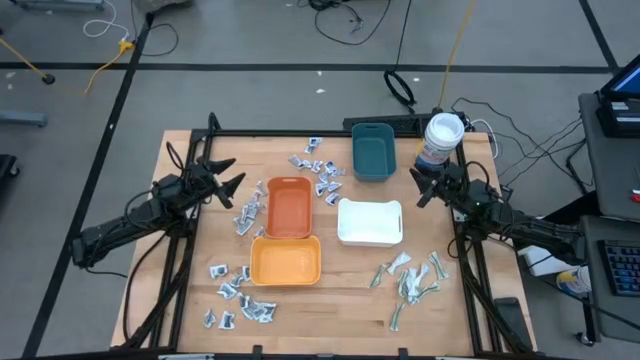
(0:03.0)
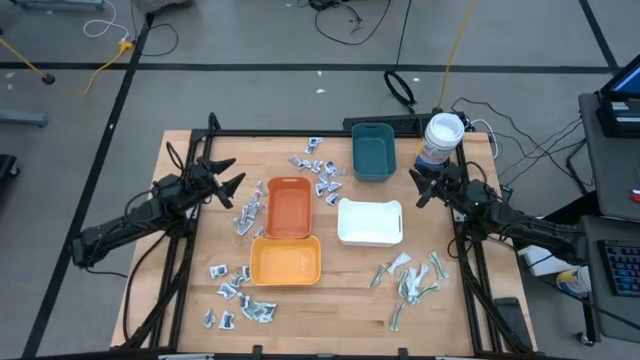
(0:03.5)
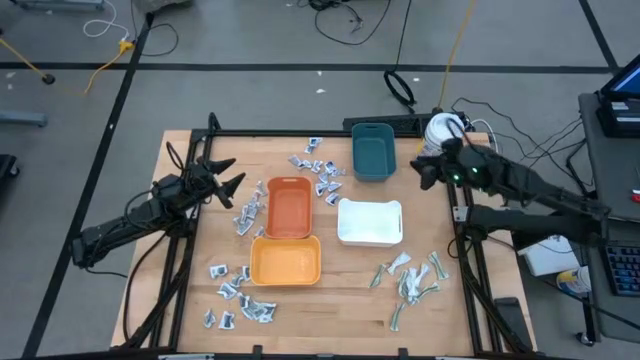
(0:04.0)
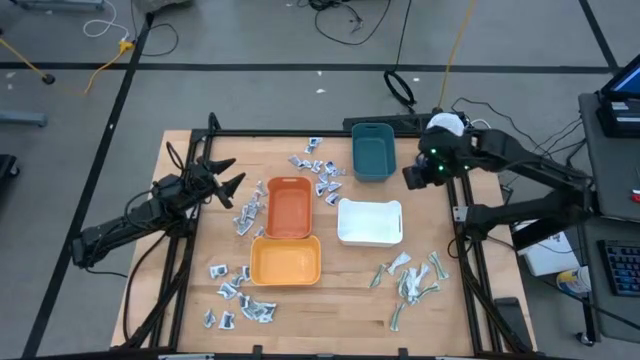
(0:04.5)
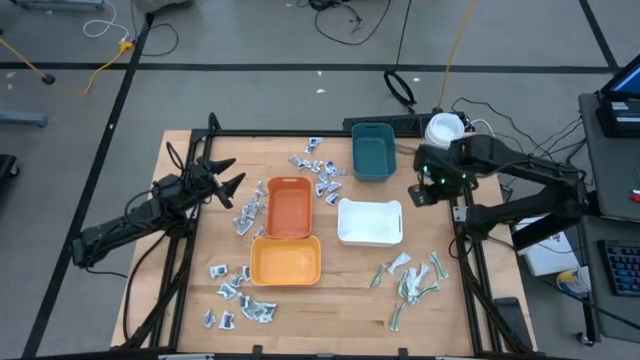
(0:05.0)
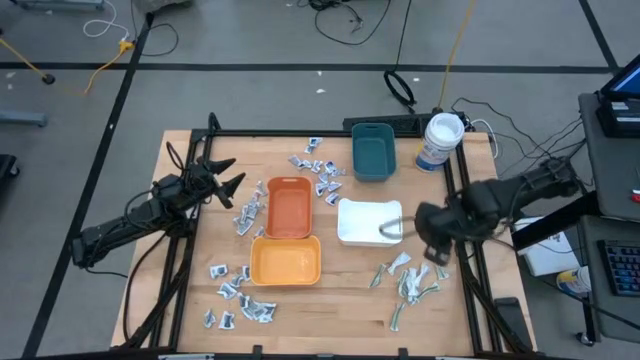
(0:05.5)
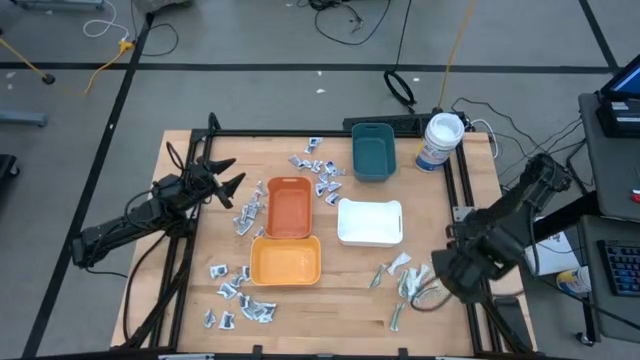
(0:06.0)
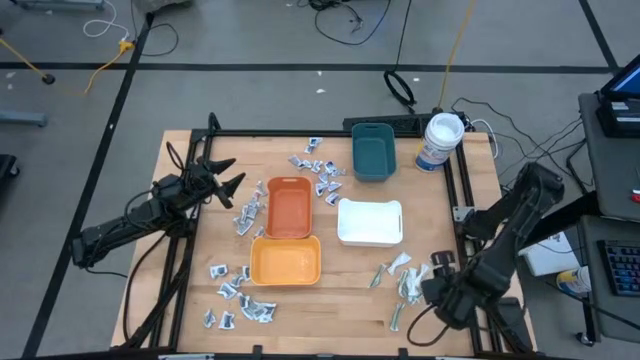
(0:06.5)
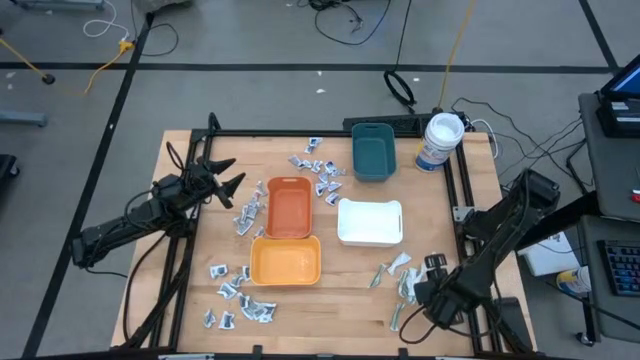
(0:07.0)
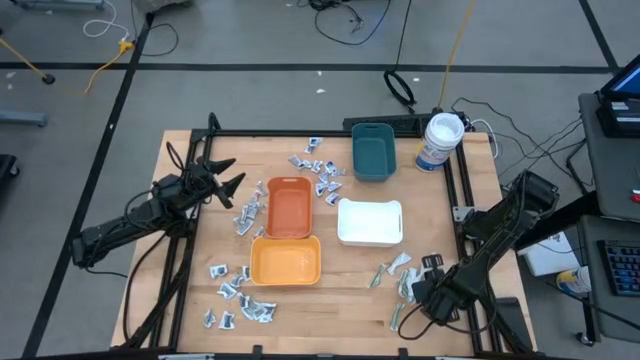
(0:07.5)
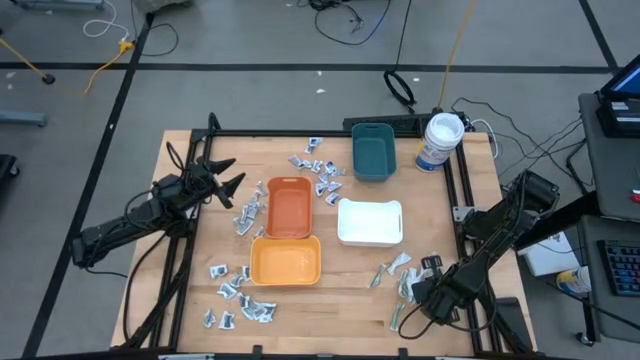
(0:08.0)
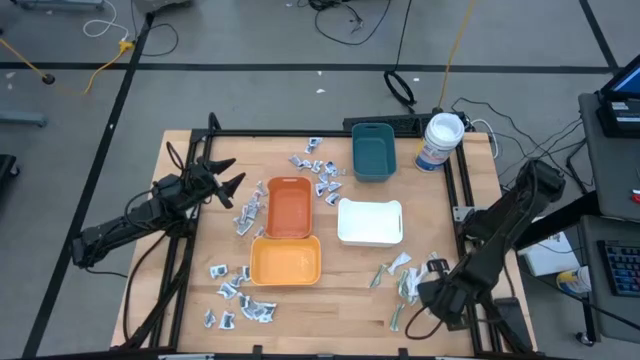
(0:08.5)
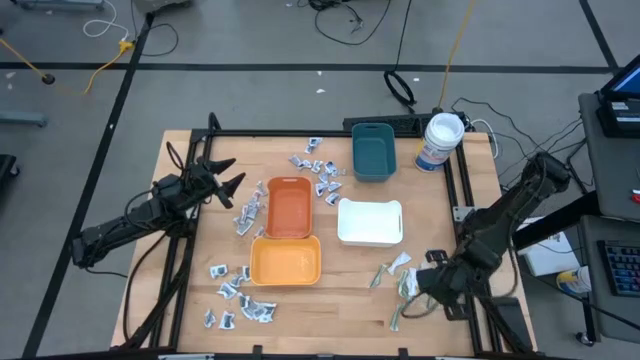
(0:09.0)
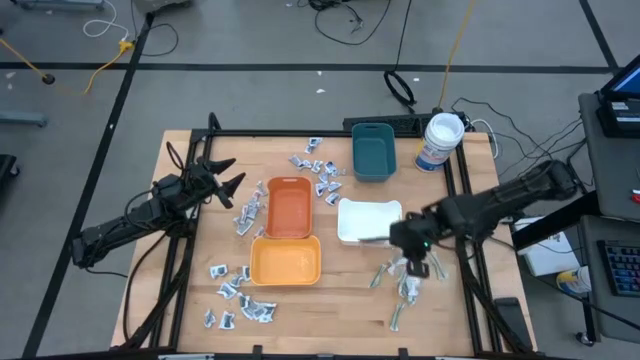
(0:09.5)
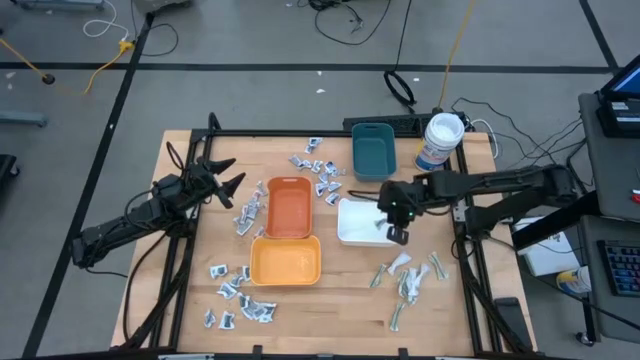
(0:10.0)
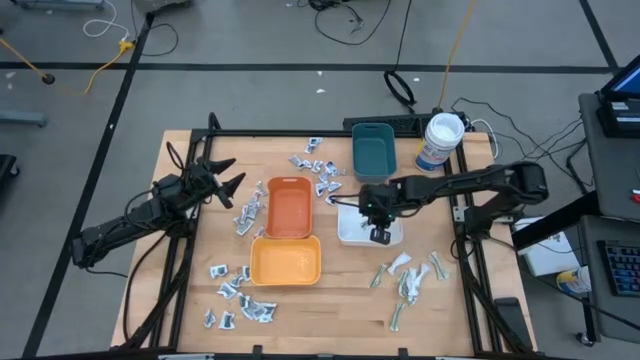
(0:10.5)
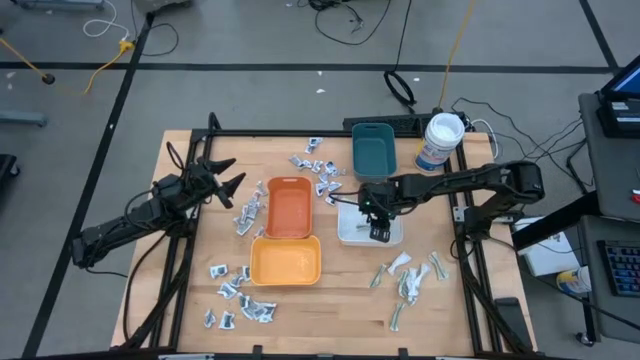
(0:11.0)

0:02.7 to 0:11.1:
Task: Pick & Place First Aid Supplies
Put the green sachet into the white bin

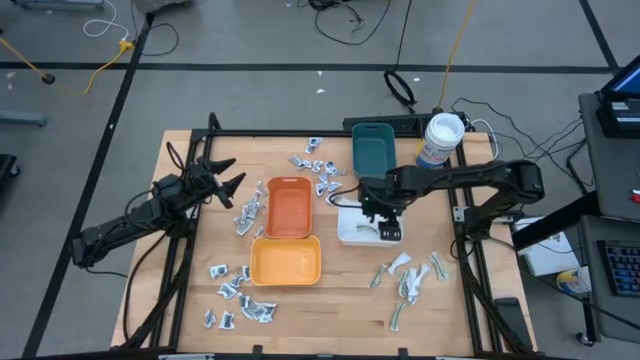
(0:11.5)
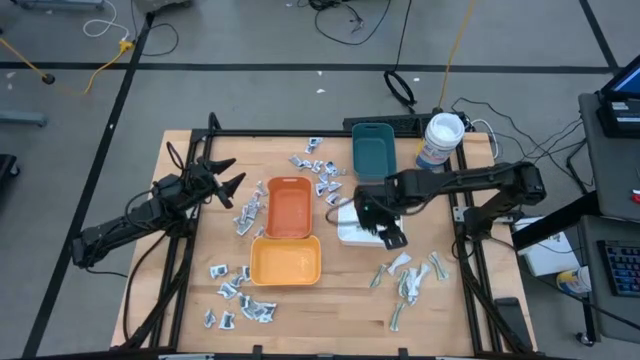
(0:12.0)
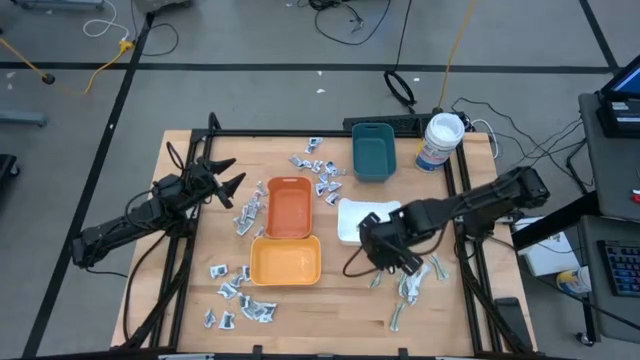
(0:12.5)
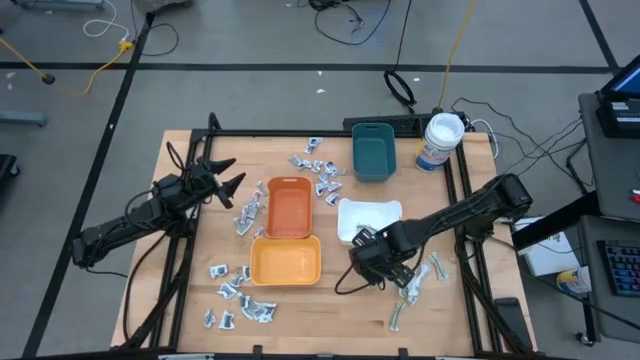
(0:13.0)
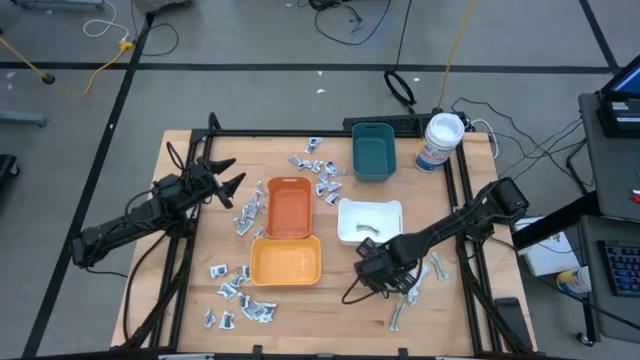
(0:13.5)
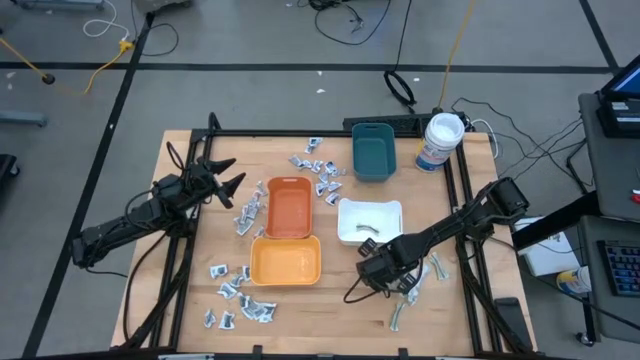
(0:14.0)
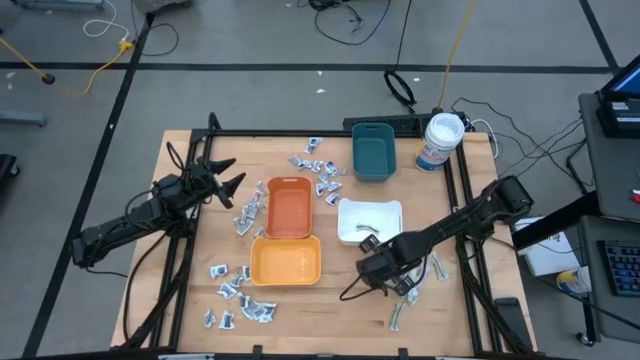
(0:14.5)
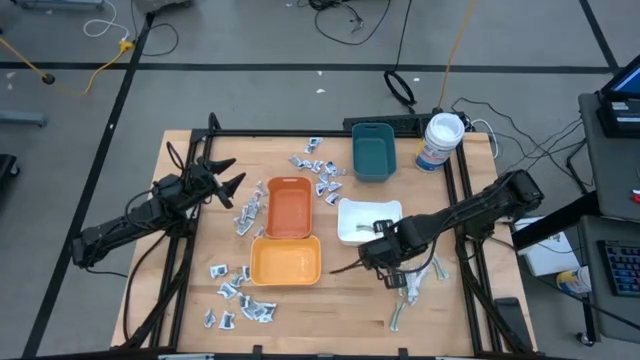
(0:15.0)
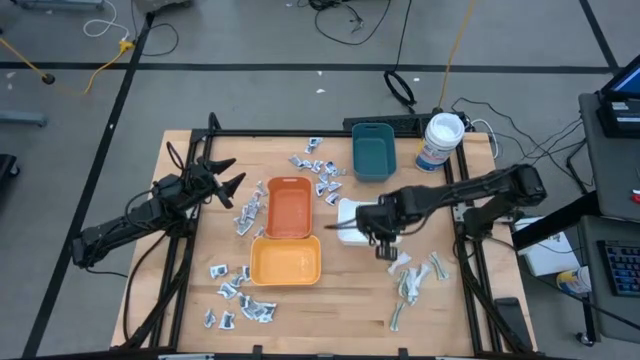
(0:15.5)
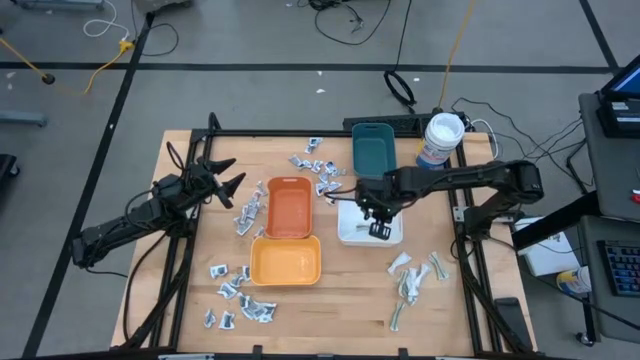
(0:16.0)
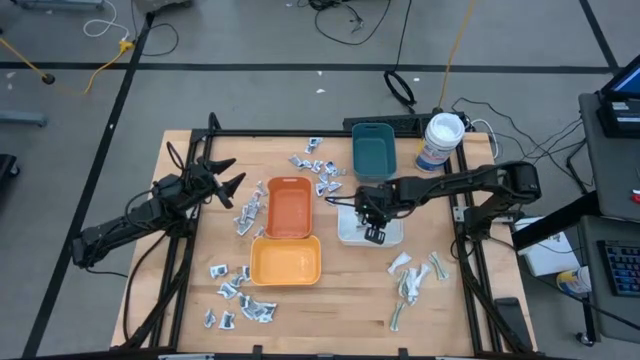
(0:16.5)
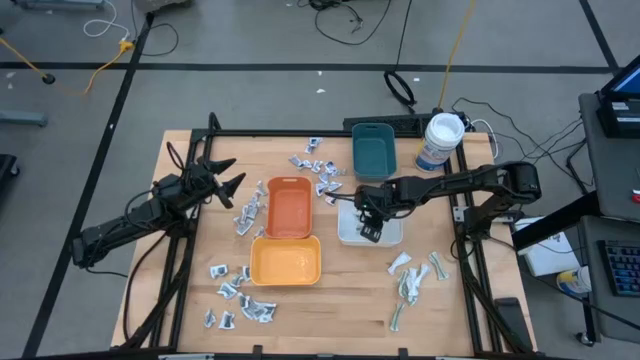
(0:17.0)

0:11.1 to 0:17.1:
Put the green sachet into the white bin

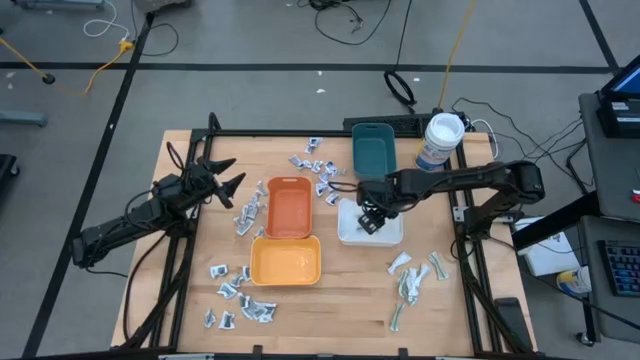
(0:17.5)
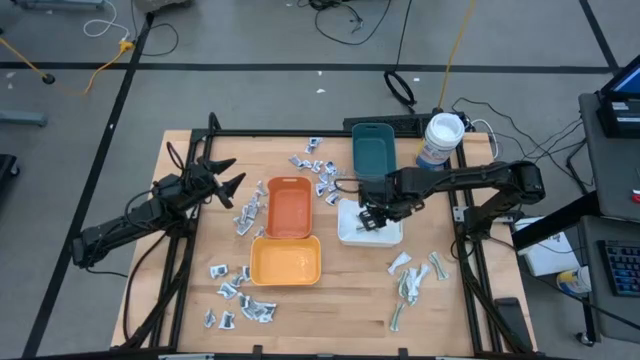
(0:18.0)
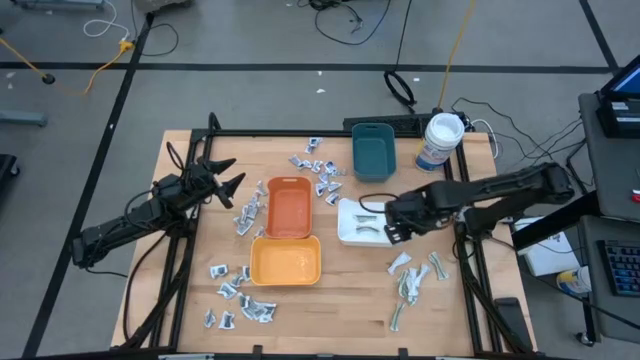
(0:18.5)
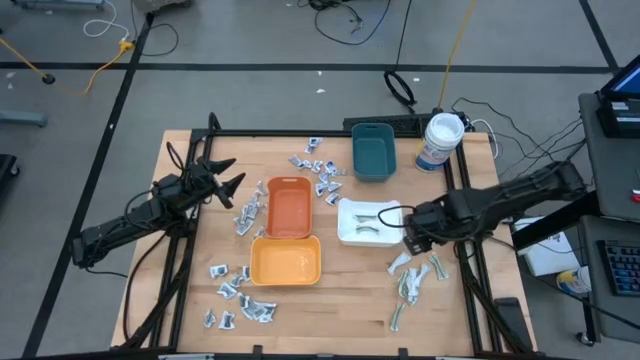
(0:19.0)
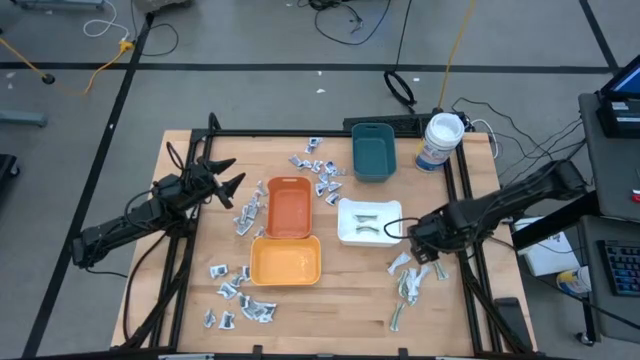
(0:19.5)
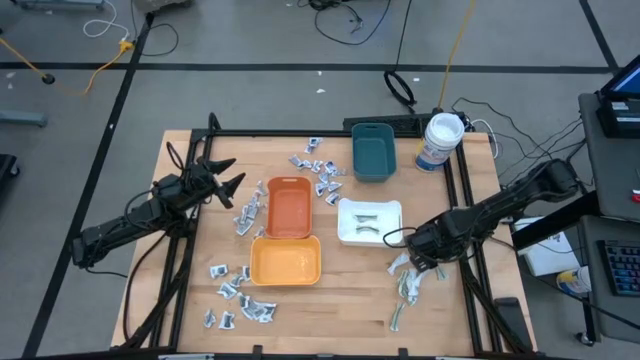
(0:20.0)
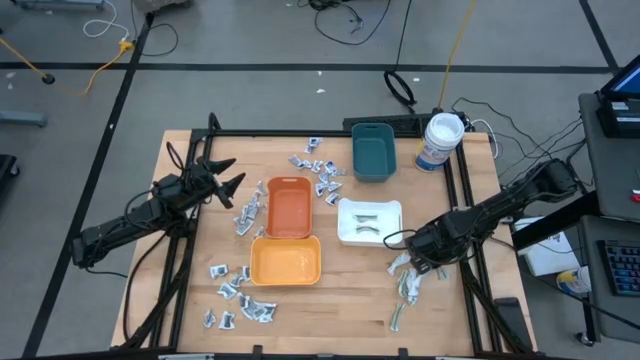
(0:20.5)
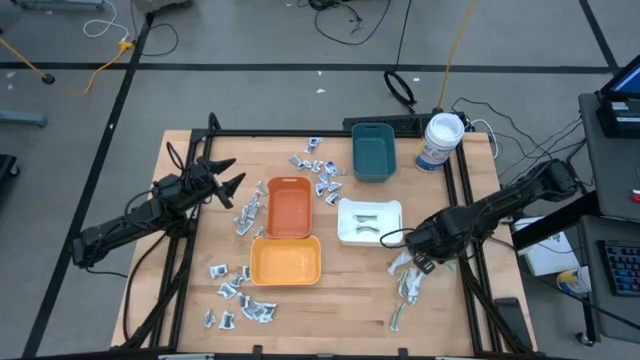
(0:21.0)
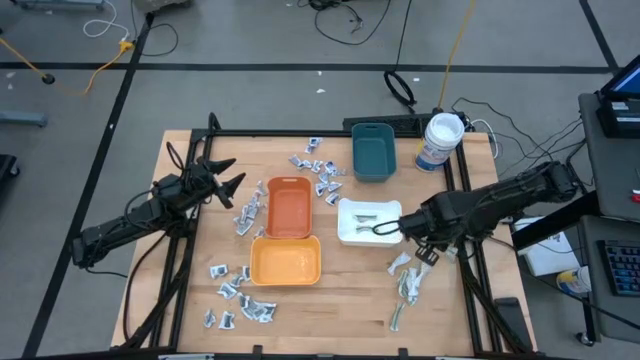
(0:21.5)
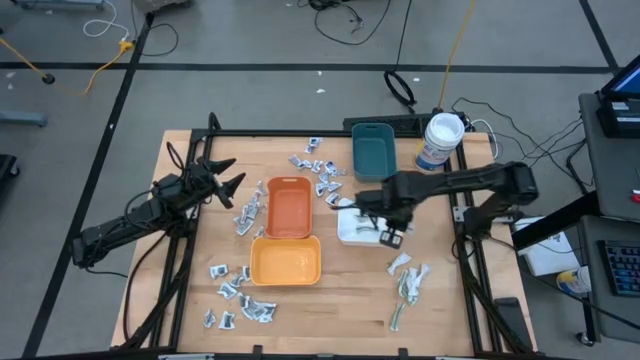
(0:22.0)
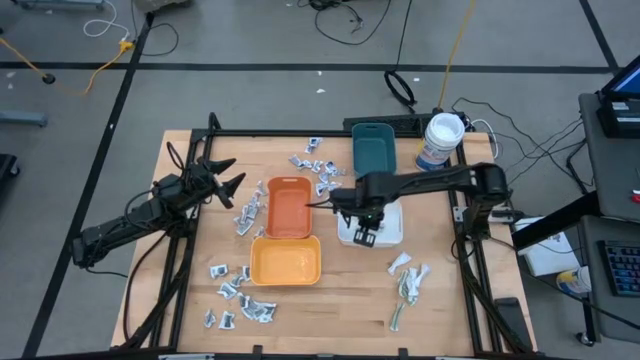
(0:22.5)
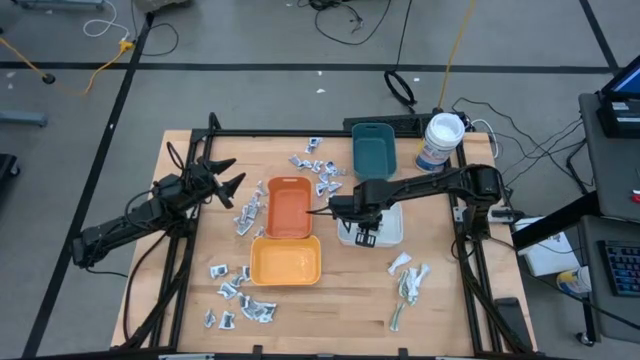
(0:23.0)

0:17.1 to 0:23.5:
Put the green sachet into the white bin

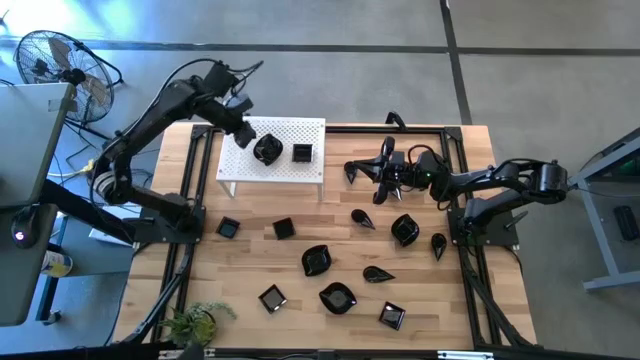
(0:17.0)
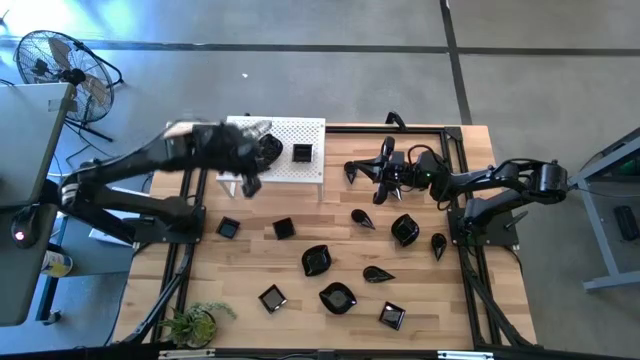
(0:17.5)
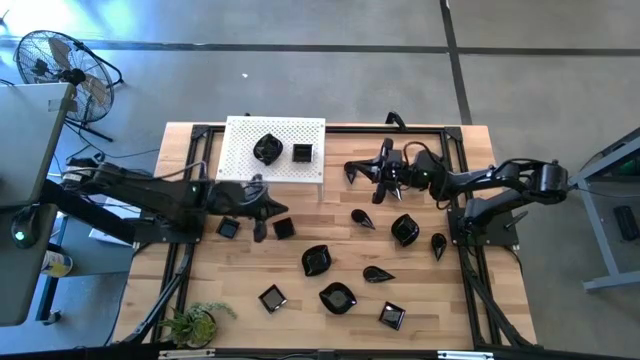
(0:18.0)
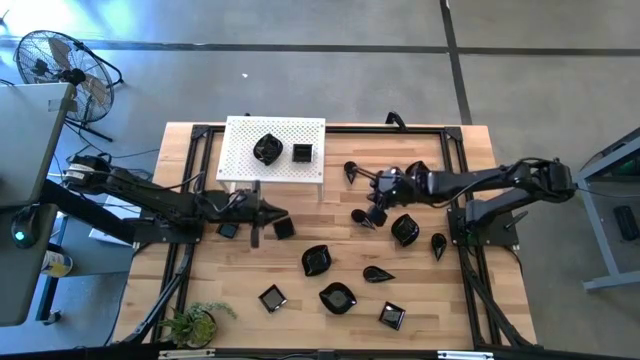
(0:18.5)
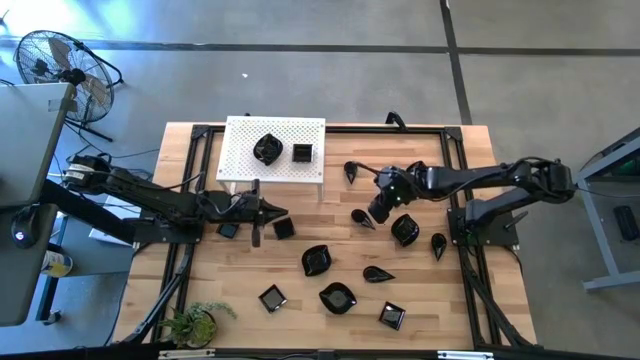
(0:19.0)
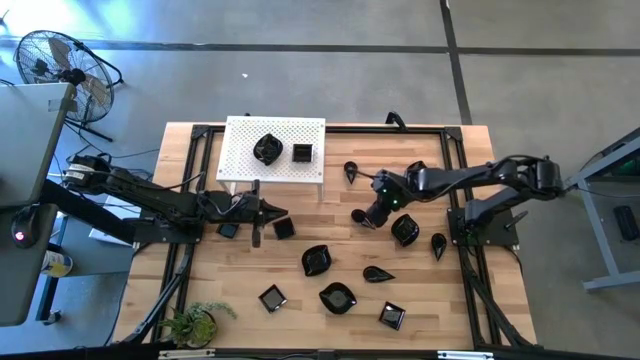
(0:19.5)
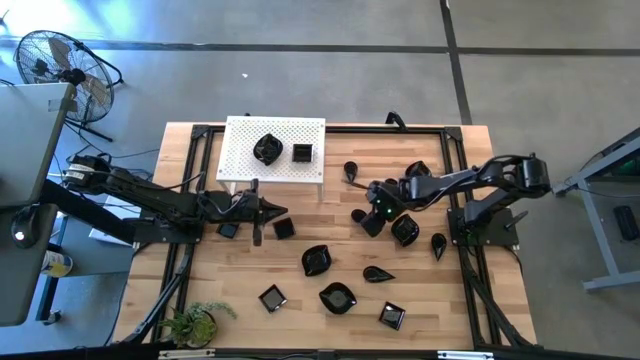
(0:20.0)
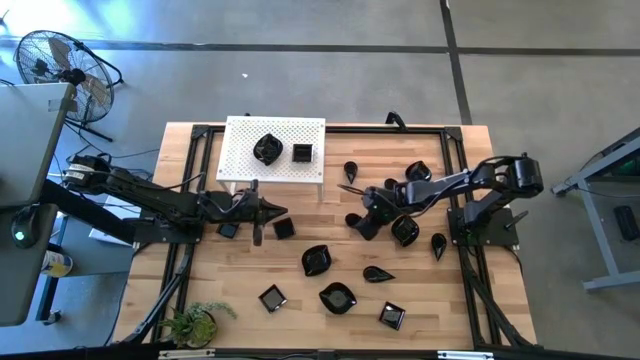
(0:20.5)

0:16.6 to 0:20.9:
Task: Pick & Place Mini shaped plates
Put the teardrop-shaped plate on the shelf
